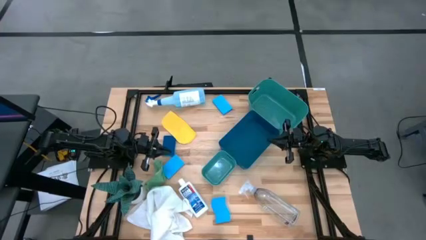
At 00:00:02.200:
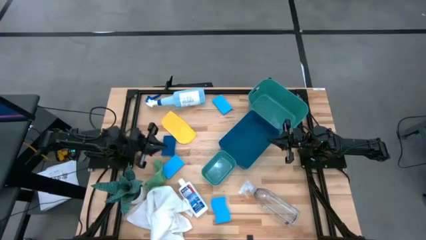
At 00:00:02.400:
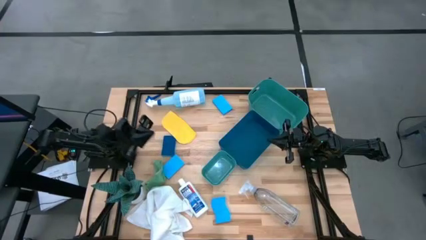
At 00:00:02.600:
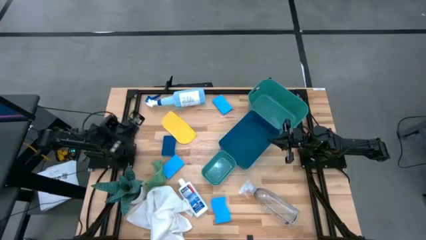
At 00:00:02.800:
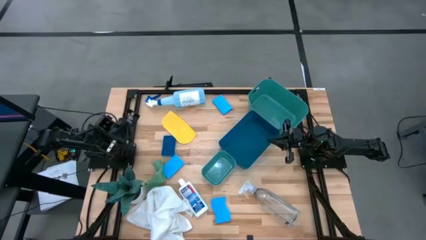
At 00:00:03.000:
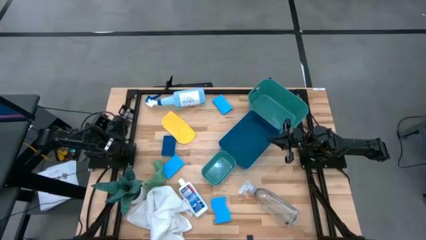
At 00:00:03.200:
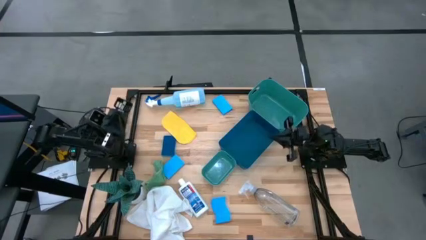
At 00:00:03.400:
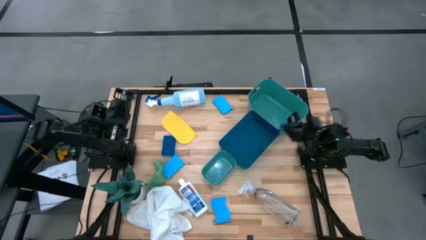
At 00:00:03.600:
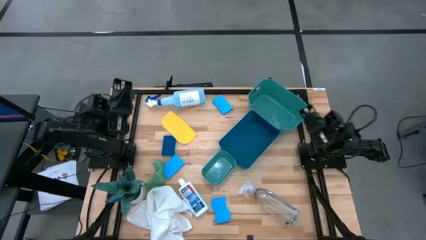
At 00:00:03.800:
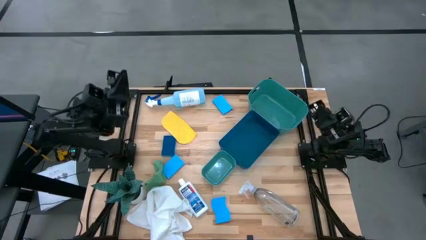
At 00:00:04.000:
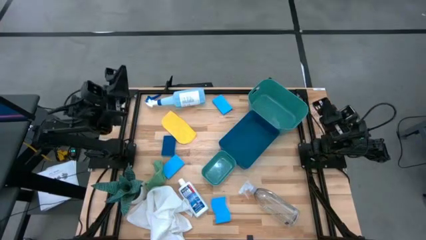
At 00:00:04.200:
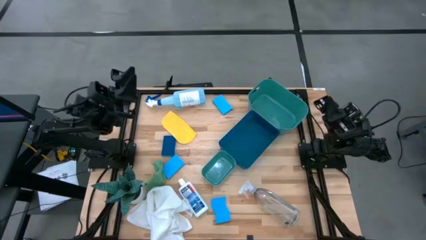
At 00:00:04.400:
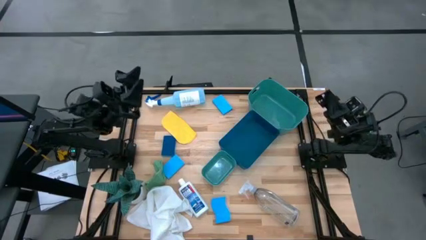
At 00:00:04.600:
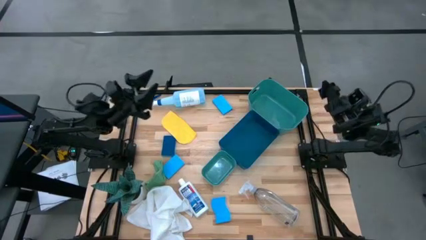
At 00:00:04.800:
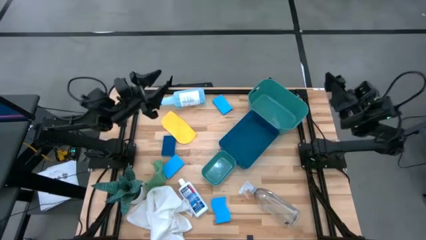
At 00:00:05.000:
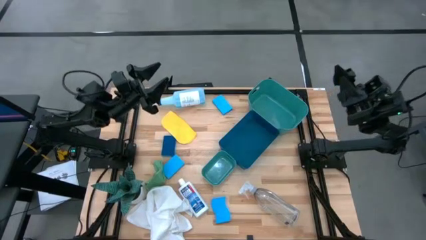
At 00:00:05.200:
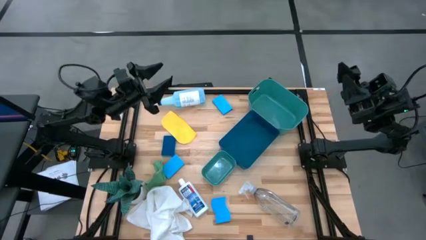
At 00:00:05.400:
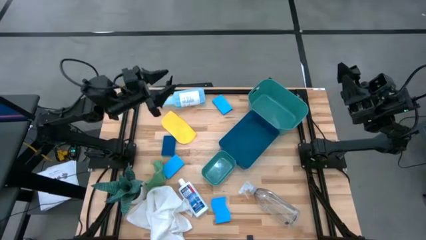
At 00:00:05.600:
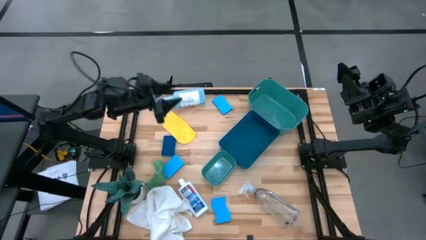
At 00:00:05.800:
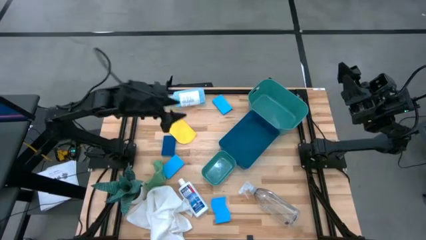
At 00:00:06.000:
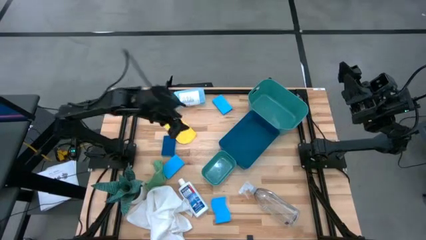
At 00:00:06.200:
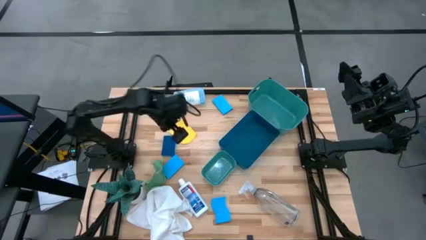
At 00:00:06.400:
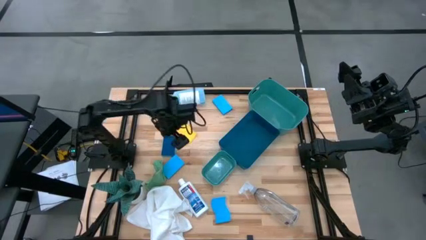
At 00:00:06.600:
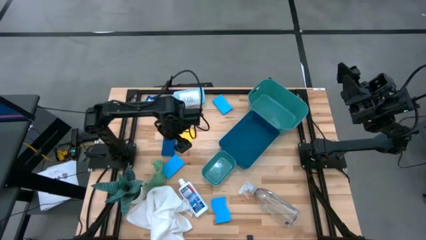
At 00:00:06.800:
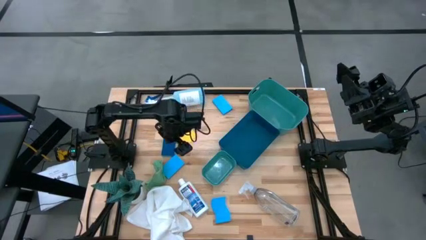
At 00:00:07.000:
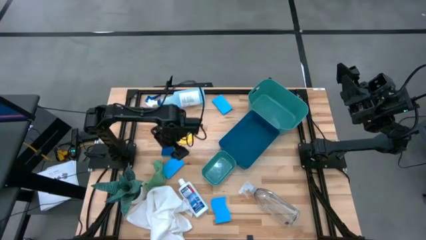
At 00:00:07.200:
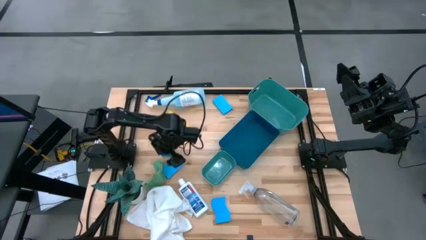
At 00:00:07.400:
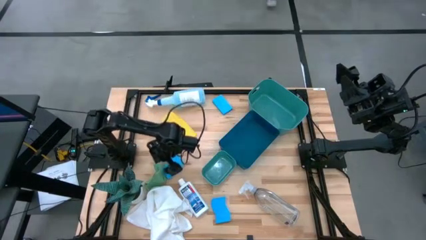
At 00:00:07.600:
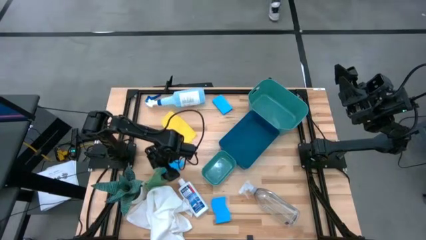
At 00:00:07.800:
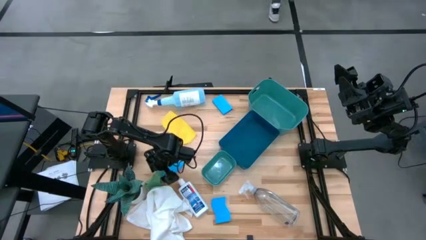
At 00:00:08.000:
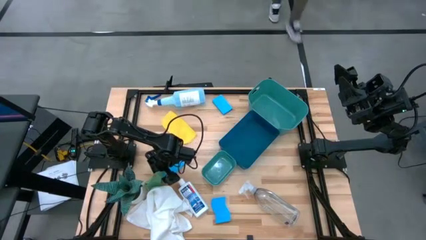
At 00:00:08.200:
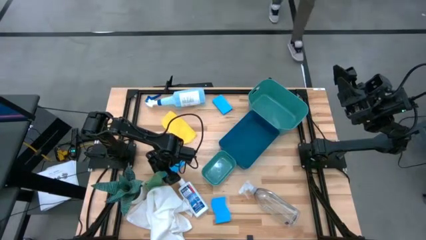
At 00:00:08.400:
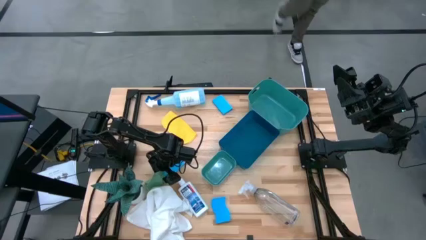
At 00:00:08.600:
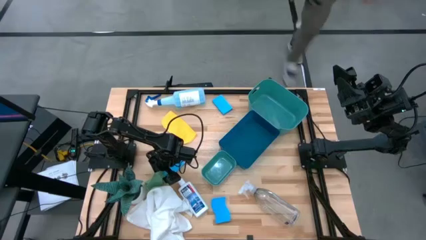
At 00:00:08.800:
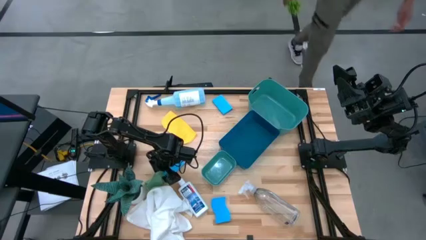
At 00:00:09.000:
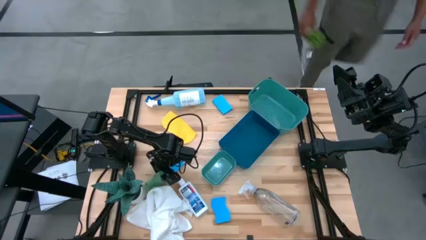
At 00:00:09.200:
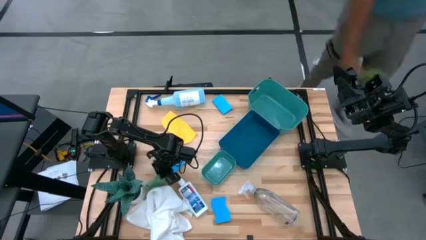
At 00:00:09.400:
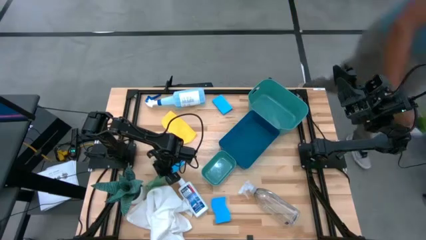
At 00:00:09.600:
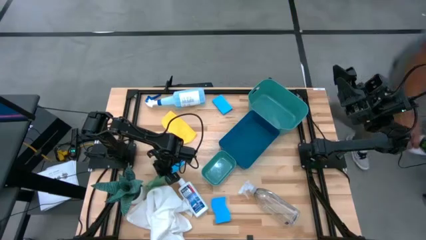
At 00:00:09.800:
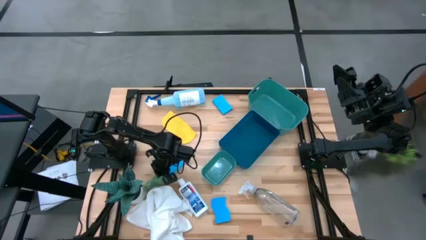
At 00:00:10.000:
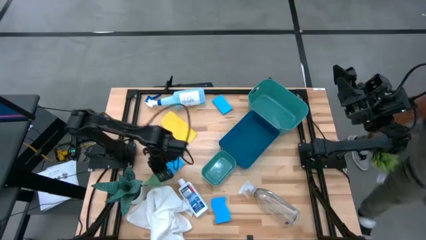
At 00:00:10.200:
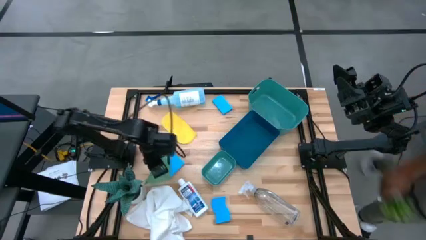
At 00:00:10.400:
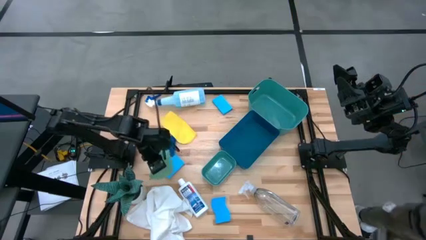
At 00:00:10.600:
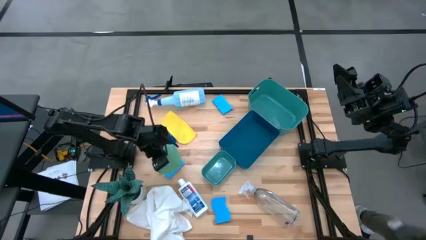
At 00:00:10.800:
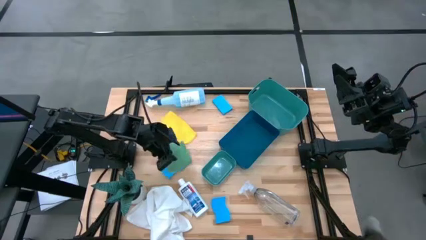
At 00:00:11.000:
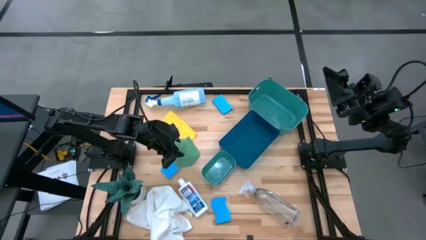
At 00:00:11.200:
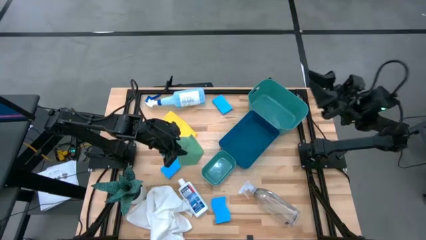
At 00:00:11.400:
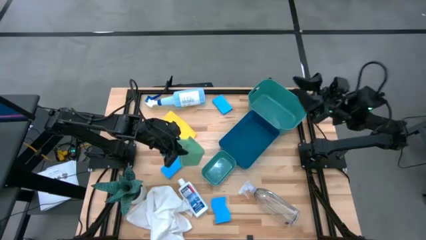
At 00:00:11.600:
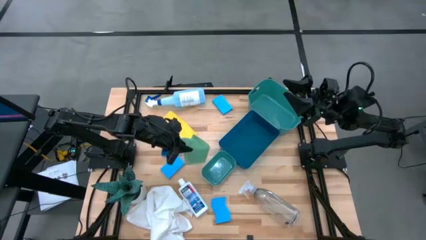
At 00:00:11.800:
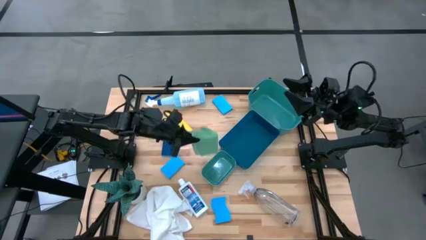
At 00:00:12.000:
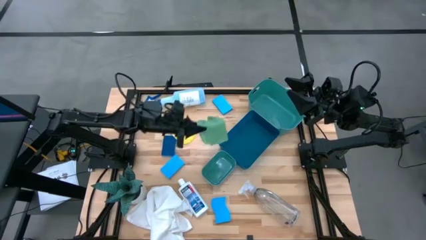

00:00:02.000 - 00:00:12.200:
Task: Pick & Place Kitchen Items
Put the green microfiber cloth into the top green bin

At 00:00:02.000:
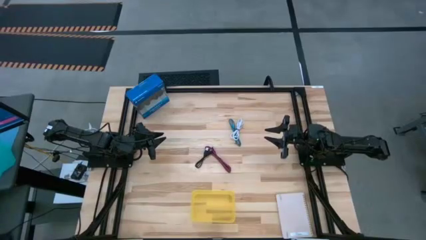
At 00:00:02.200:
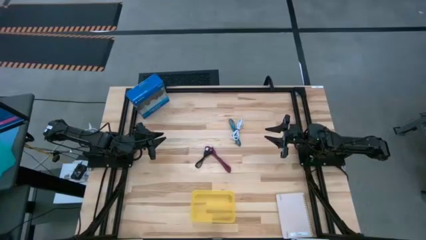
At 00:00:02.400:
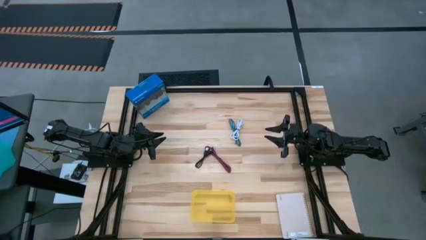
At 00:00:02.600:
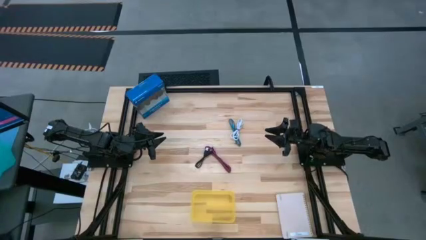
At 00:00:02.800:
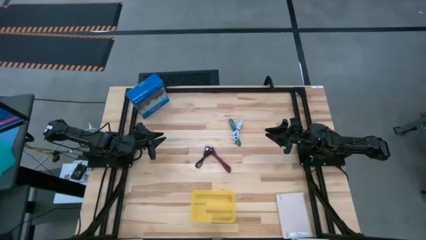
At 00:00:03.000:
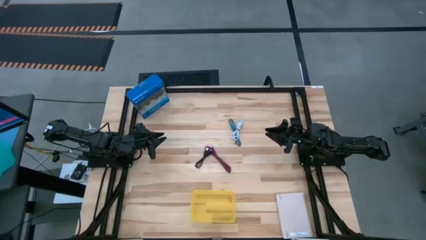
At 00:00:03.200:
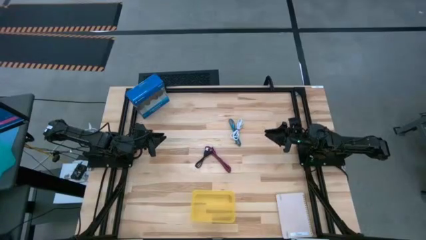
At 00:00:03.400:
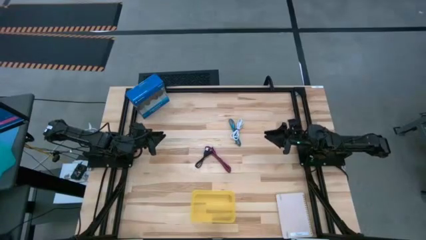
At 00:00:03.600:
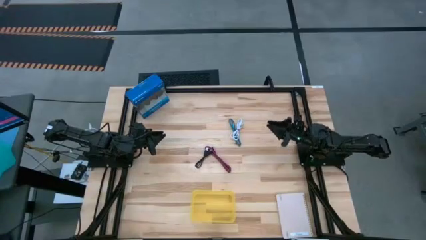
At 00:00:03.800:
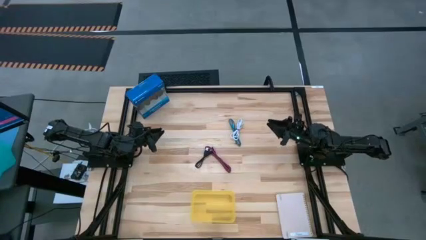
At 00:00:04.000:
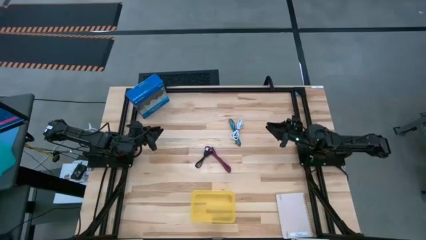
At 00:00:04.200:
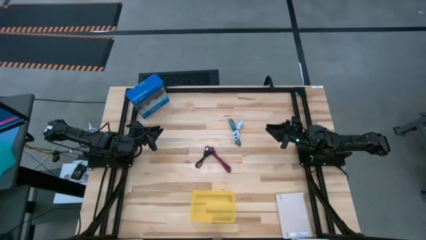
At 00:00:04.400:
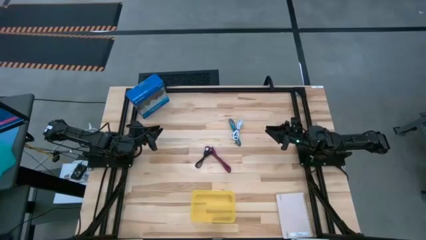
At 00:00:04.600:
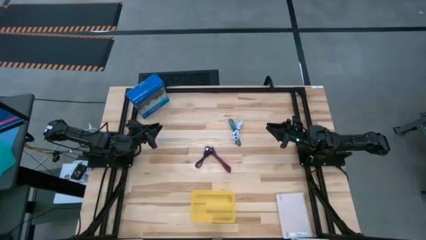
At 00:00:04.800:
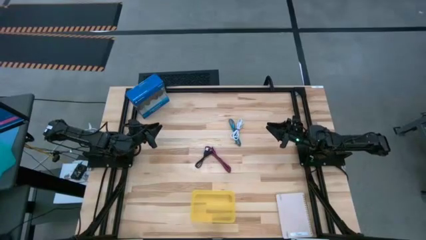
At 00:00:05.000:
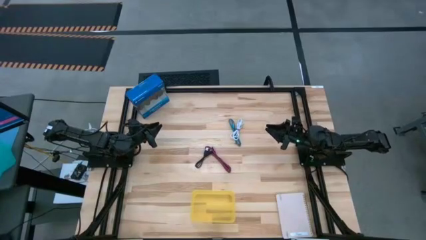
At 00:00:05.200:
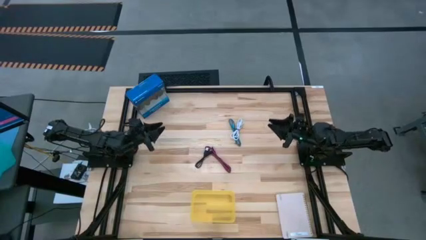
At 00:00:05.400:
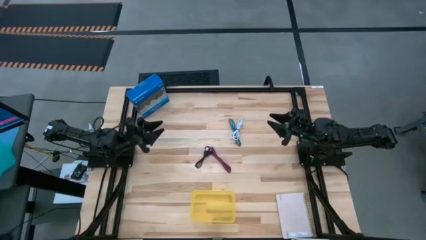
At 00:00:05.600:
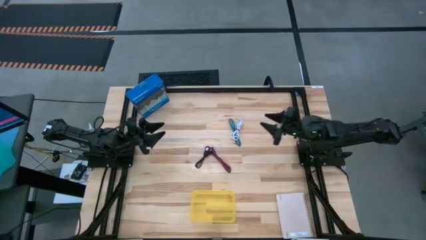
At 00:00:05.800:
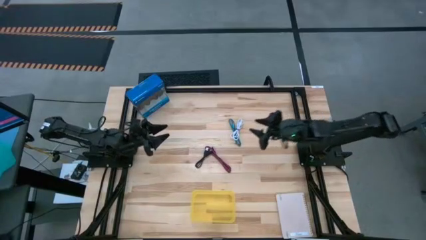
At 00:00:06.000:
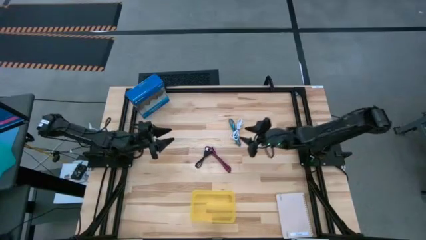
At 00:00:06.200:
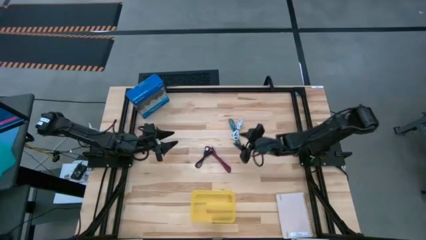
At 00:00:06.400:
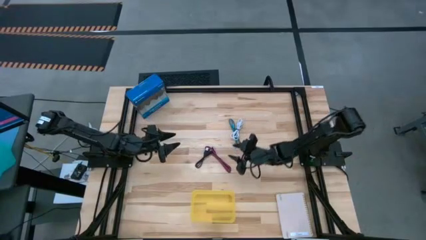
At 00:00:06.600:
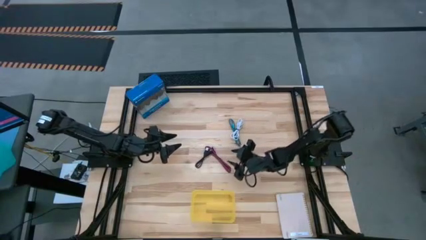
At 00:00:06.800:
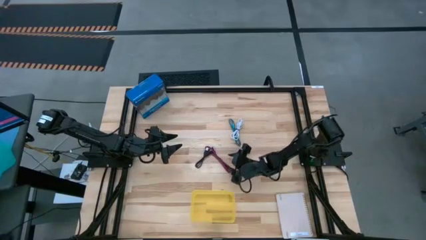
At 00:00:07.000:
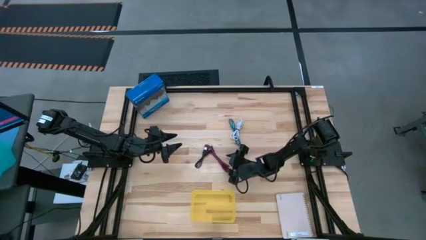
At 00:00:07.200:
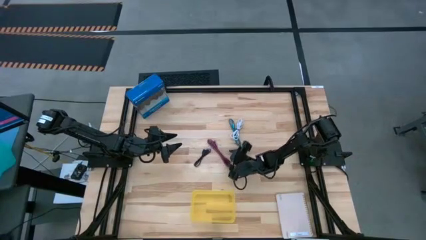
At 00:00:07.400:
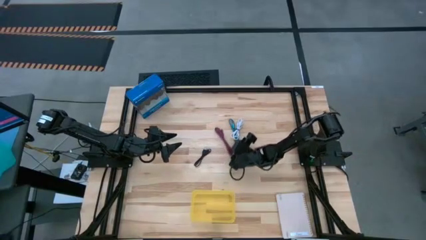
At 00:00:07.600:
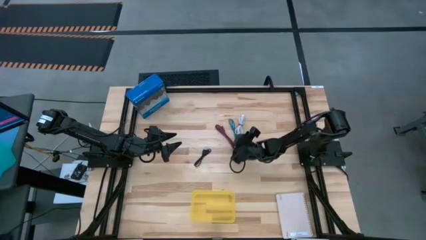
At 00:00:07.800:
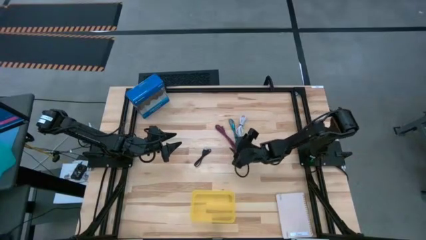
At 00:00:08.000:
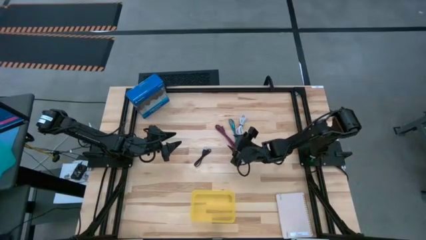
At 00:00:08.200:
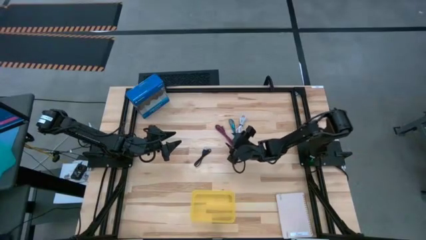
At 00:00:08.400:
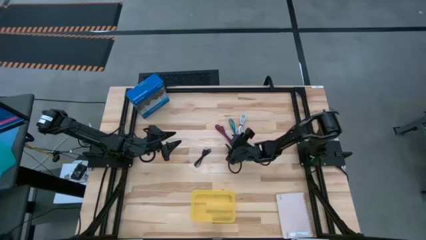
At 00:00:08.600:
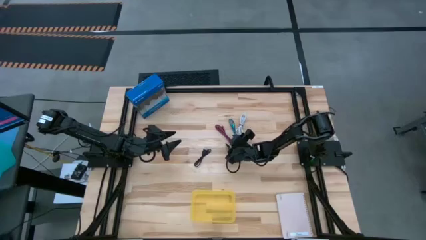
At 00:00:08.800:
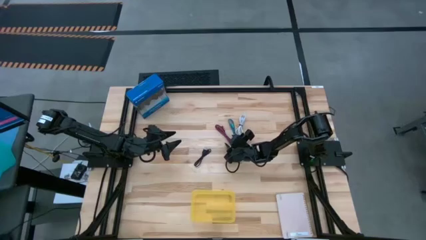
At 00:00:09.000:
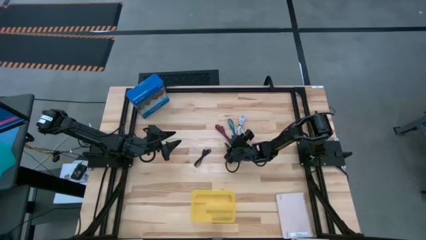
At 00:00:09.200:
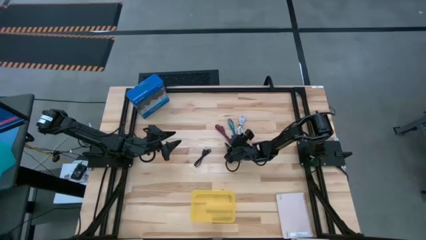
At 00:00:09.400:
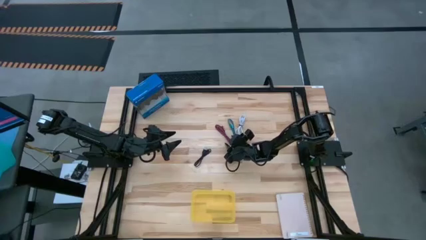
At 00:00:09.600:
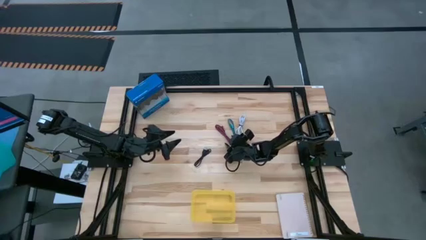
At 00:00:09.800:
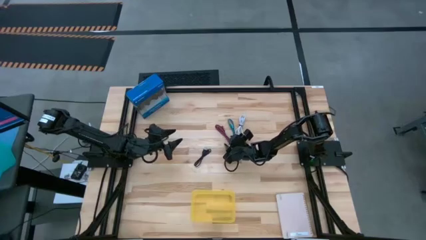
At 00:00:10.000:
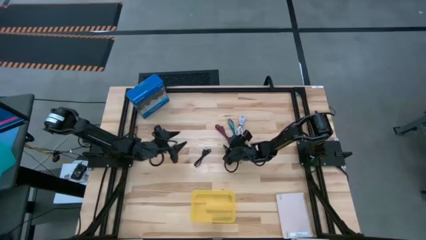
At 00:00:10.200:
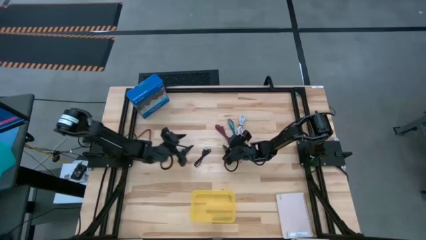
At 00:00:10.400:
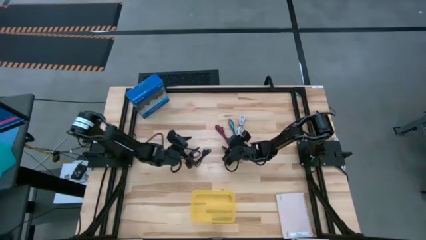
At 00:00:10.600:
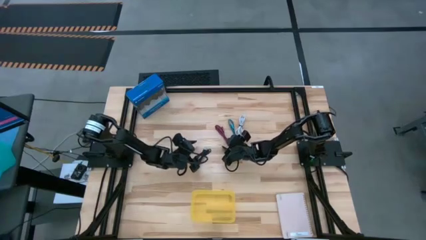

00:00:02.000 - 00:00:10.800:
Task: Pick and place USB-C Cables
Move the pink charger cable to the center of the table
